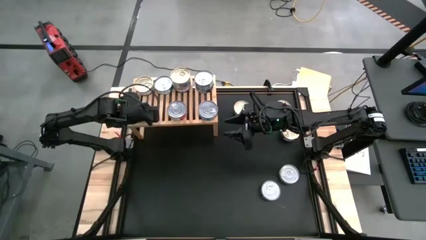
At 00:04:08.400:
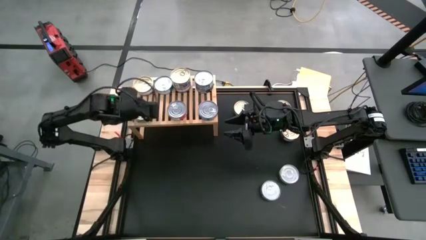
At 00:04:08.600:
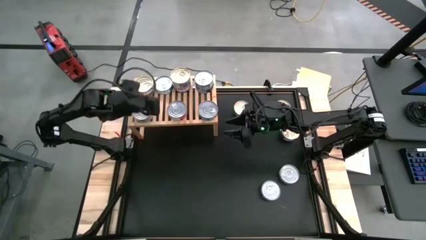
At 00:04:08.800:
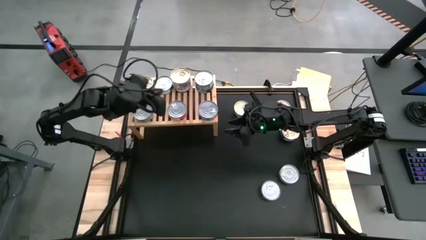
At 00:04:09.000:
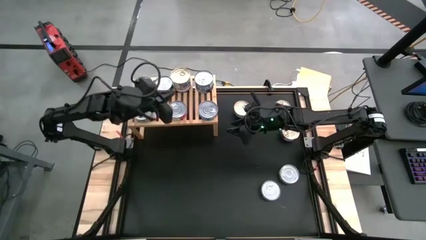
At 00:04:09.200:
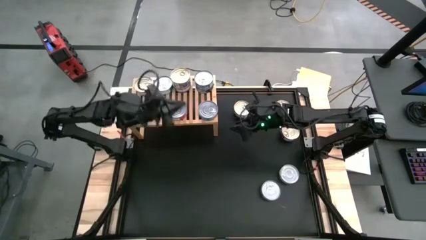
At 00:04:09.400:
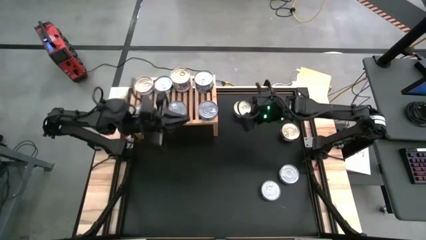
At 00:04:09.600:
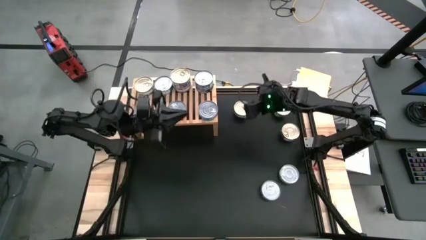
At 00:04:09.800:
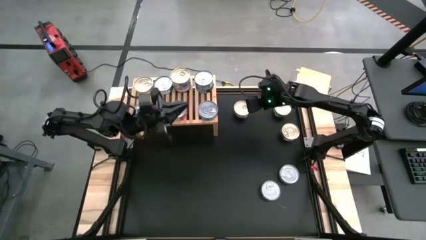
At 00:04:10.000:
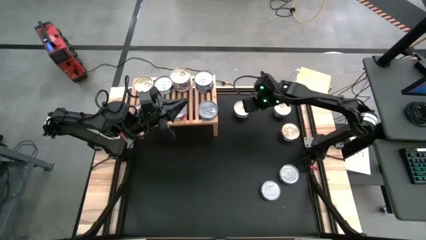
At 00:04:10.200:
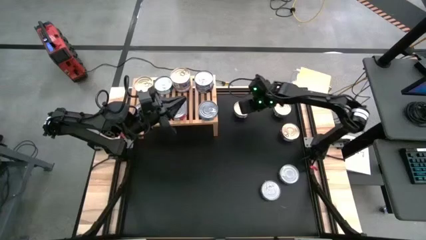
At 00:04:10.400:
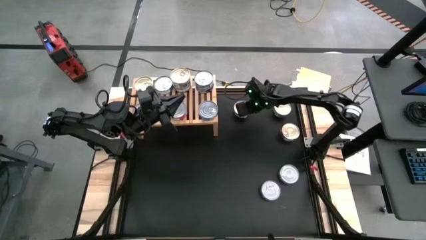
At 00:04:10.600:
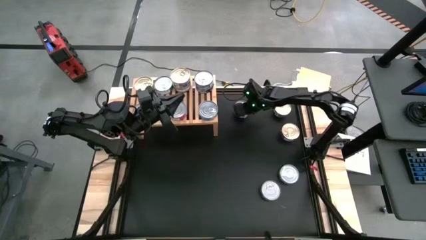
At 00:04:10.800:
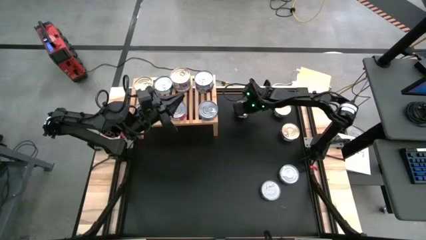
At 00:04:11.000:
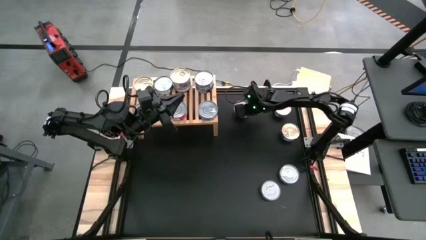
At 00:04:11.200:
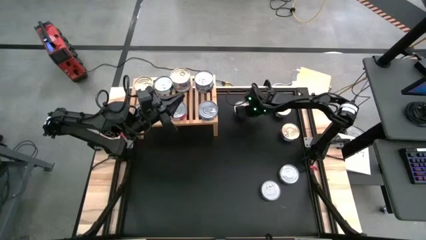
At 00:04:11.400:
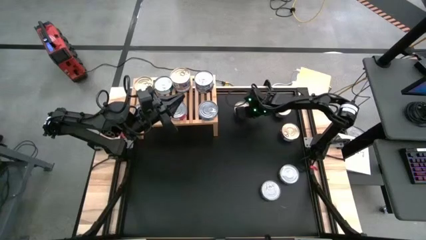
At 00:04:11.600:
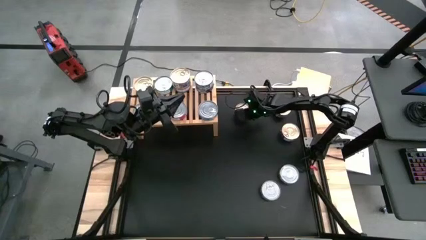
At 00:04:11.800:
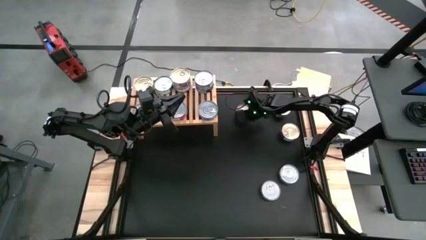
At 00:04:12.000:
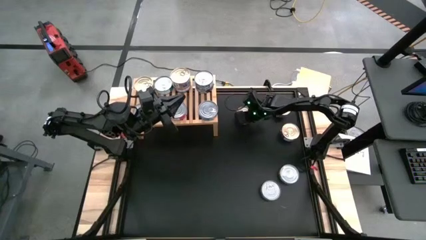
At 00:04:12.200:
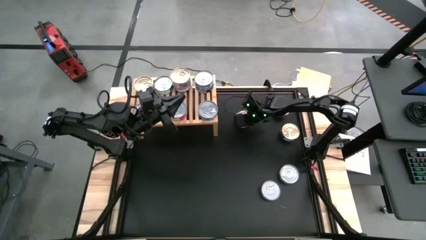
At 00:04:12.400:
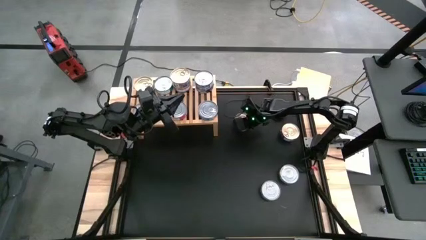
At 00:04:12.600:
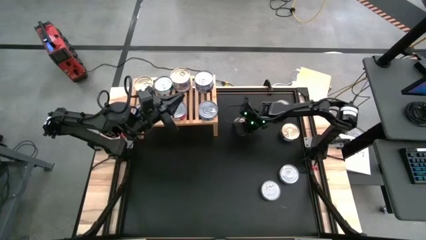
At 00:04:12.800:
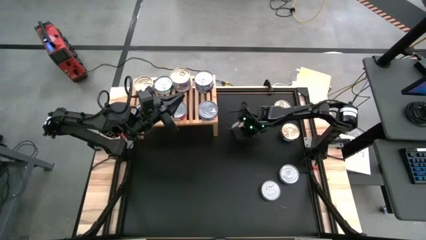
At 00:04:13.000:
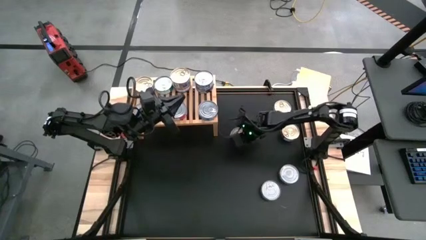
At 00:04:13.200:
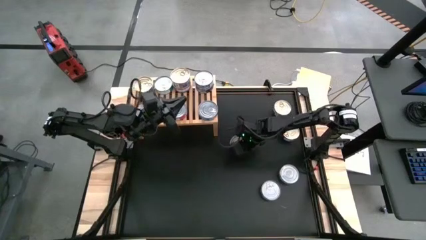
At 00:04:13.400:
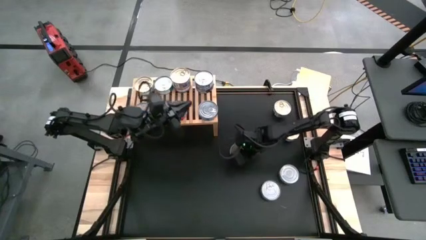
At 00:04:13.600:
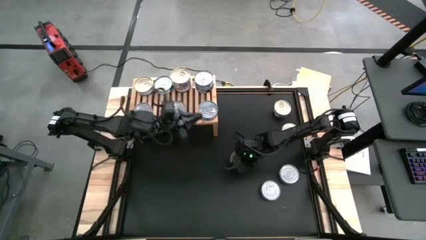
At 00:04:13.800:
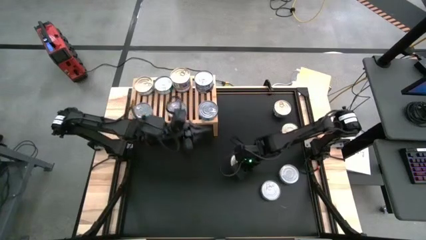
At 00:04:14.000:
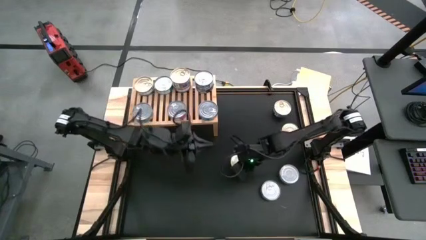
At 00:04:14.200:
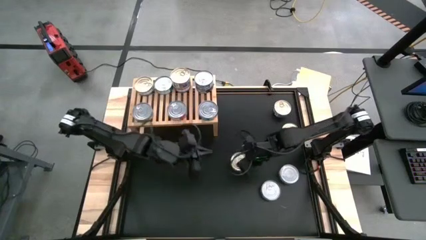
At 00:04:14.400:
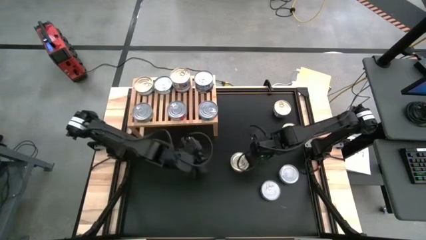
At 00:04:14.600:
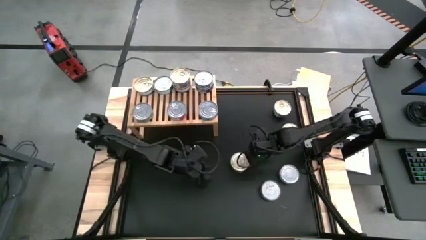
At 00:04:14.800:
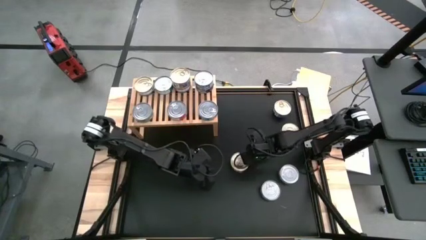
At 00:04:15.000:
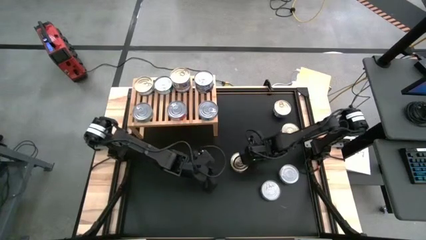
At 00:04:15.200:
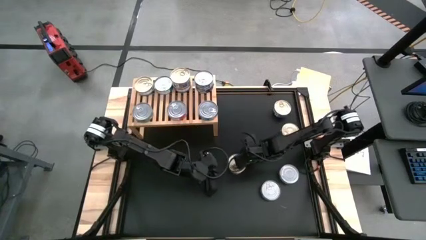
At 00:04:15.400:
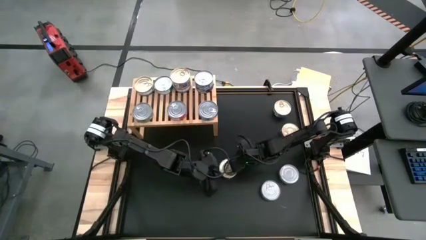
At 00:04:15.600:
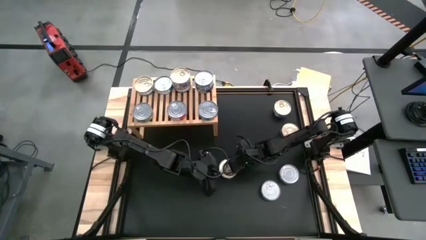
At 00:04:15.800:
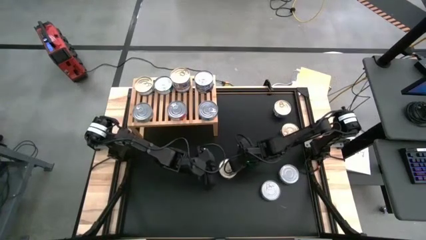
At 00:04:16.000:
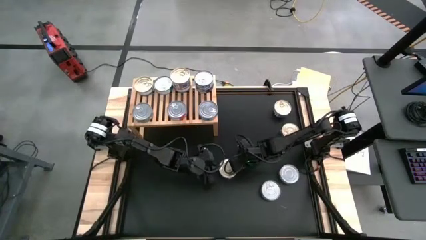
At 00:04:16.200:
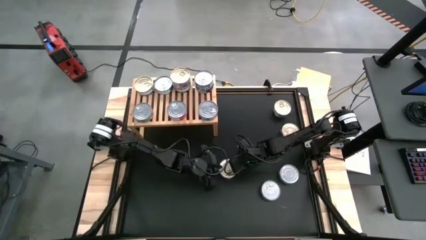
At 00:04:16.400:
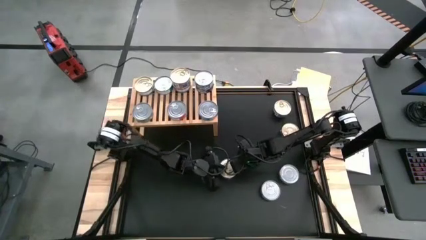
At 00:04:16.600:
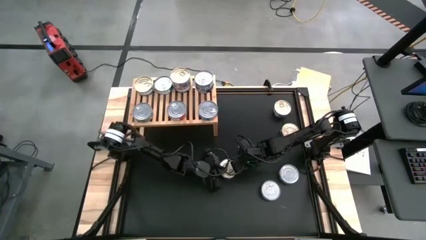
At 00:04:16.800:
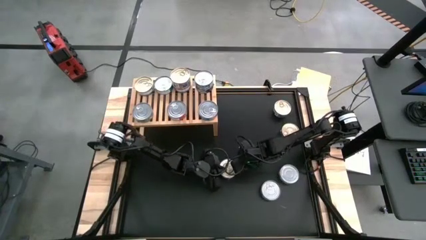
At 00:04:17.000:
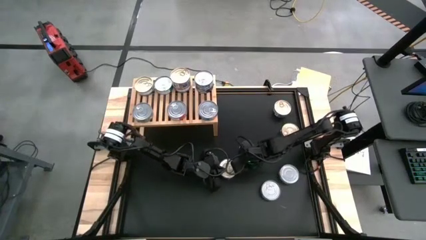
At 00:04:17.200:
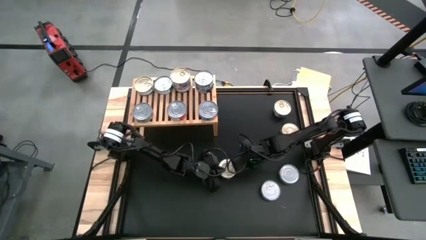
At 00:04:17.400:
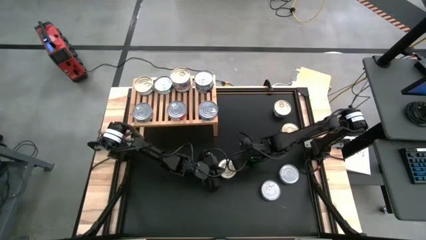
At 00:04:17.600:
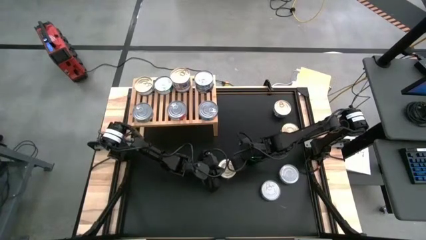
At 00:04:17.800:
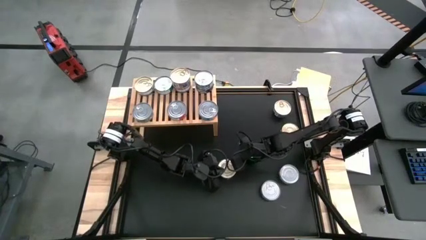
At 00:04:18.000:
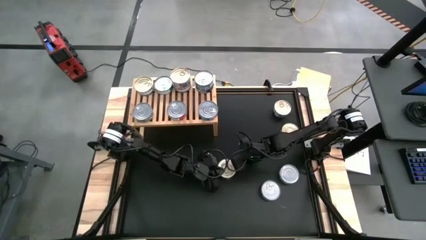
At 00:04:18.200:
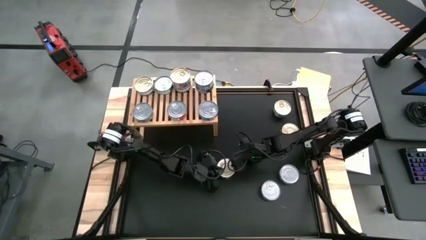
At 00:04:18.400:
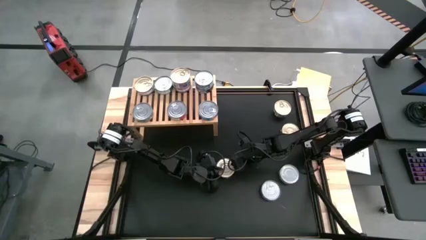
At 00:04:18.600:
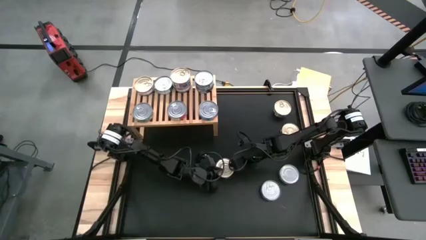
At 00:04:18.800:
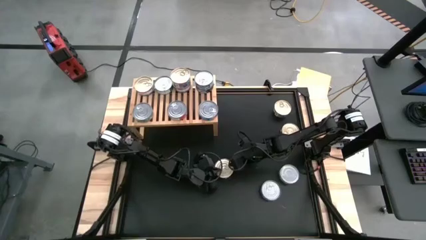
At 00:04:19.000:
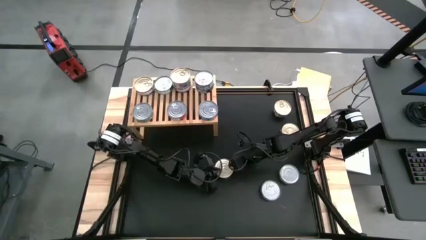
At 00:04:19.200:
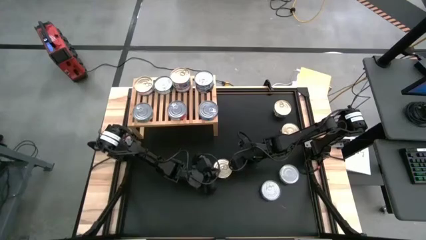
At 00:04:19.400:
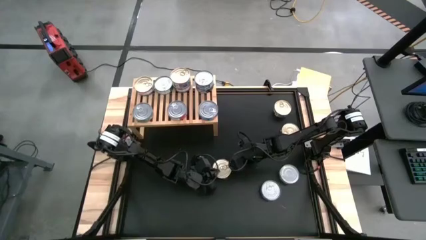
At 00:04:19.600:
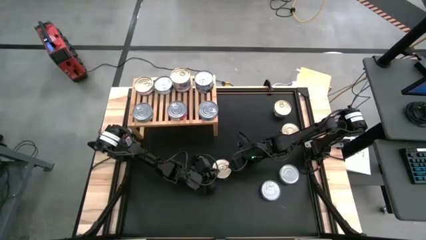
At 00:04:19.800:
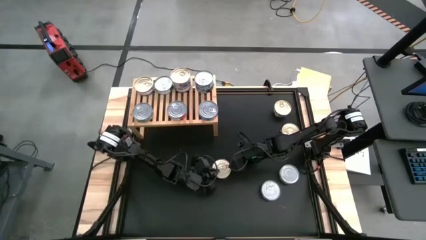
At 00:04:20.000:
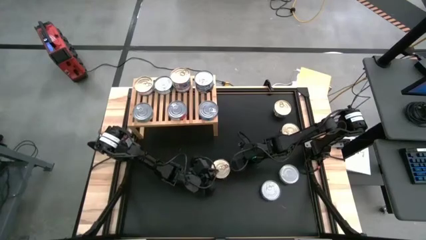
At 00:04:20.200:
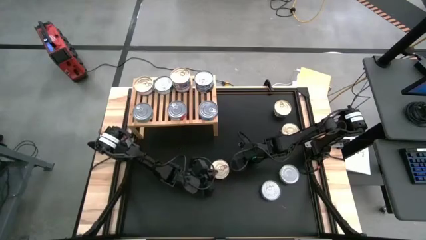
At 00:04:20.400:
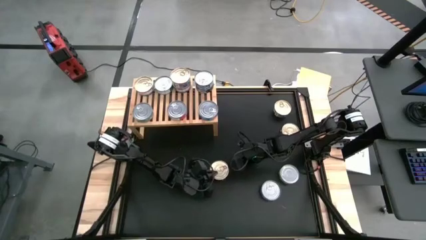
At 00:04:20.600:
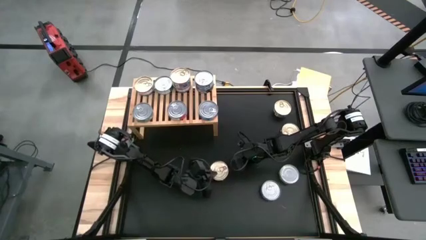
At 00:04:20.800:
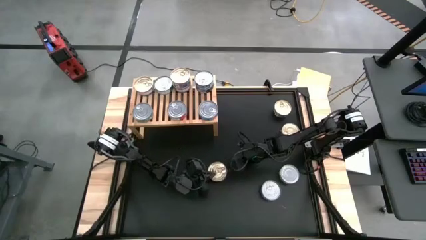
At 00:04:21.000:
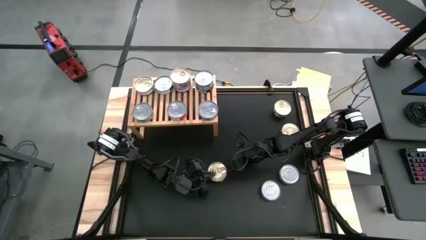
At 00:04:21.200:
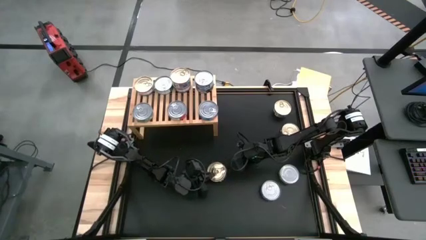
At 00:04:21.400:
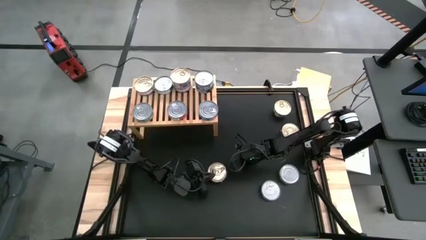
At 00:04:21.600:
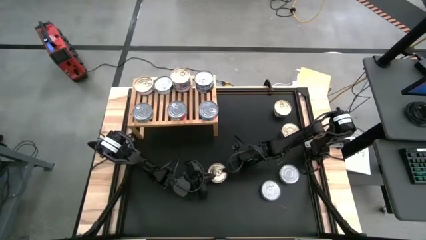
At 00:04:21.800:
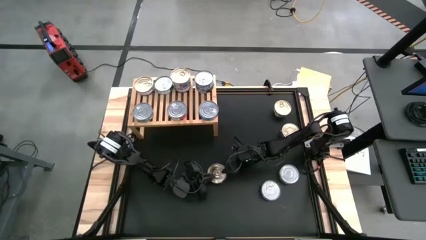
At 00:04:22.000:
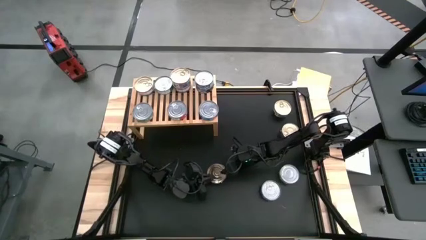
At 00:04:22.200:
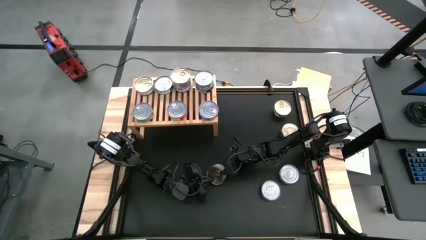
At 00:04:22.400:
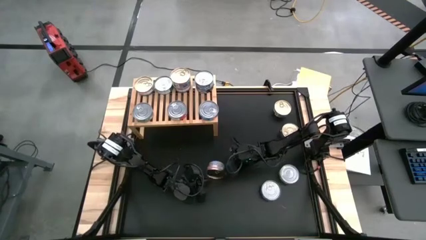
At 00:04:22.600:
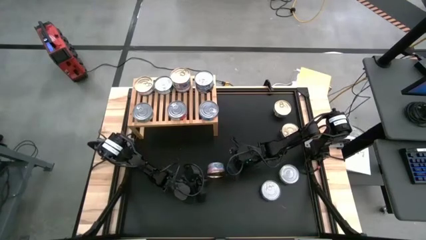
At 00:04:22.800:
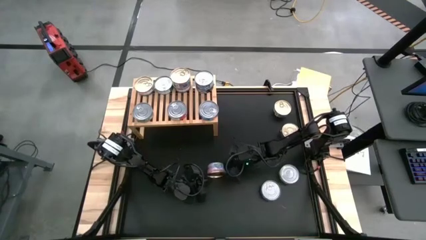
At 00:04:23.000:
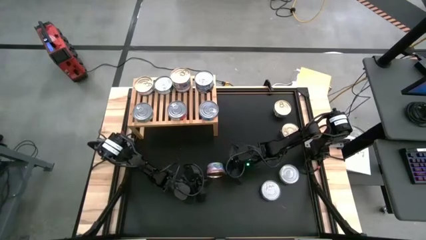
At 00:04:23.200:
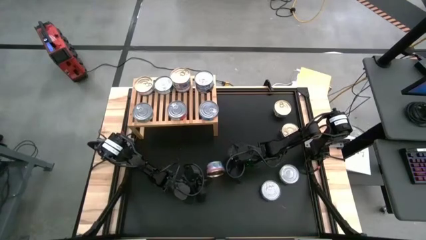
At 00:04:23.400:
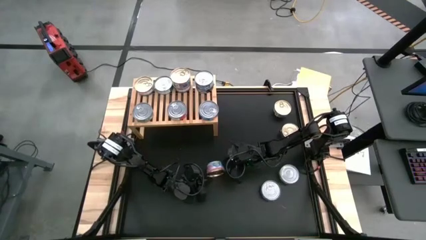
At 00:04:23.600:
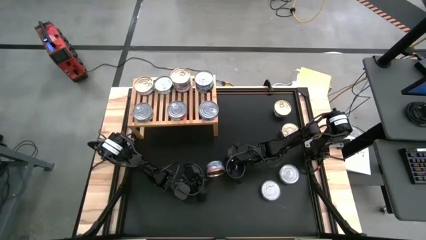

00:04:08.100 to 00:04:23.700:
Task: Stack canned seafood by type on shelf
Stack the blue pink tuna can on top of the other blue pink tuna can on the shelf
